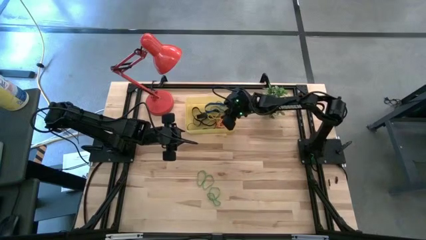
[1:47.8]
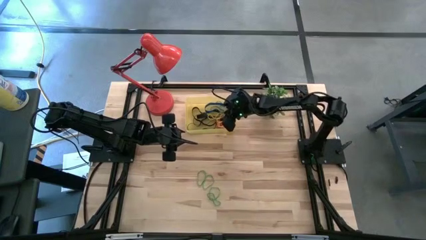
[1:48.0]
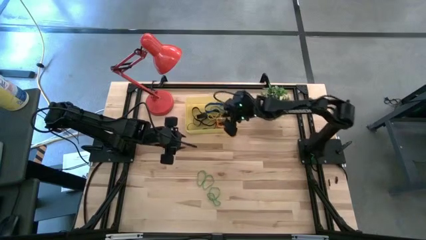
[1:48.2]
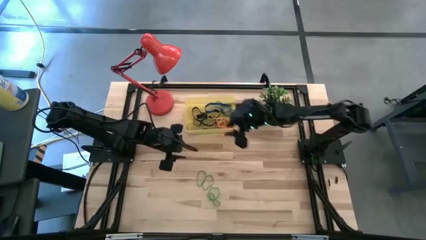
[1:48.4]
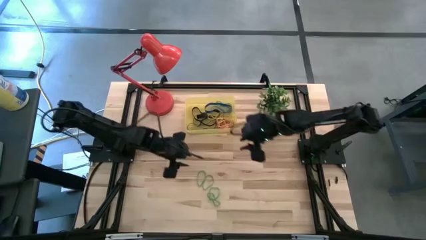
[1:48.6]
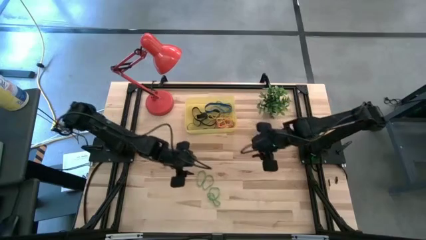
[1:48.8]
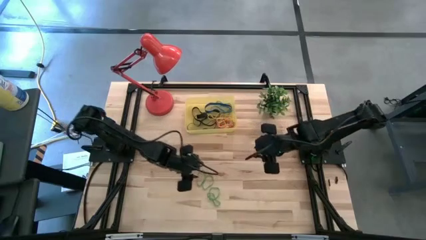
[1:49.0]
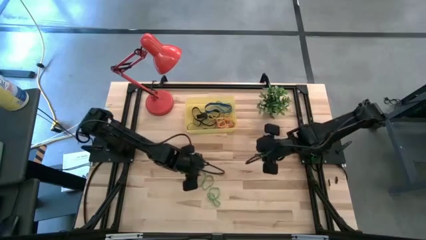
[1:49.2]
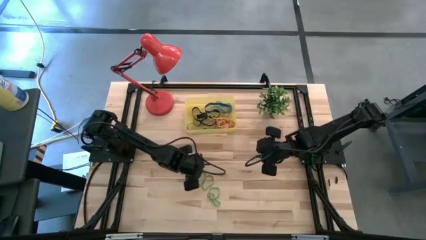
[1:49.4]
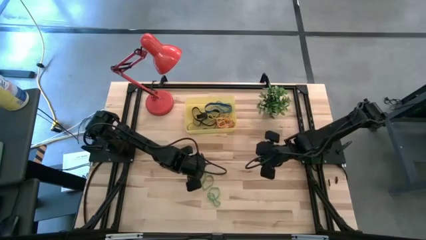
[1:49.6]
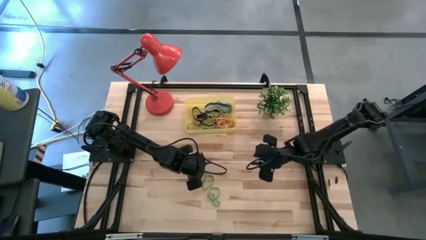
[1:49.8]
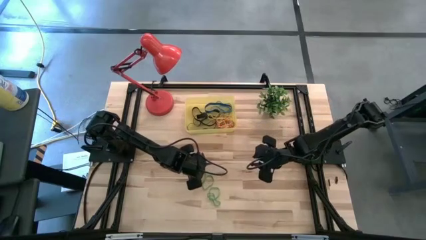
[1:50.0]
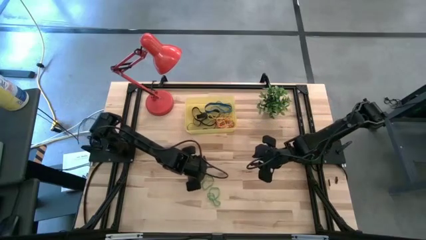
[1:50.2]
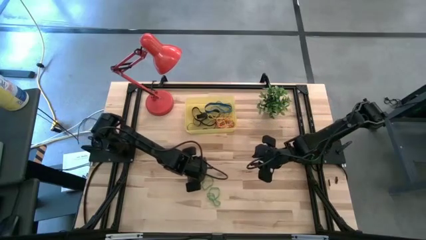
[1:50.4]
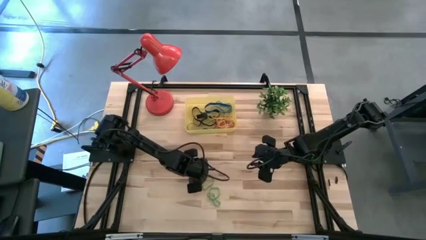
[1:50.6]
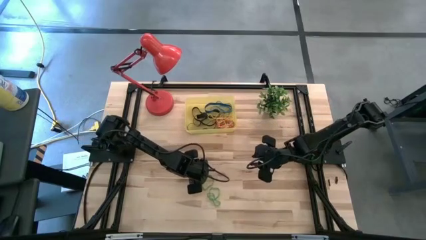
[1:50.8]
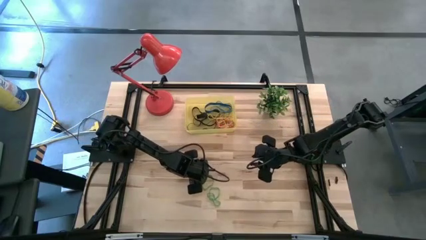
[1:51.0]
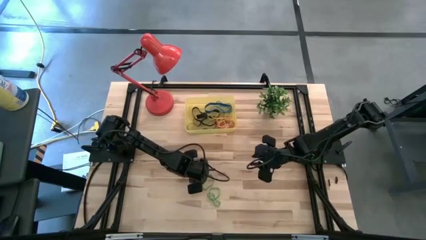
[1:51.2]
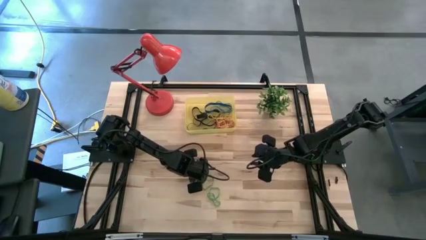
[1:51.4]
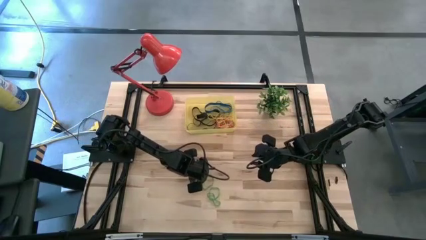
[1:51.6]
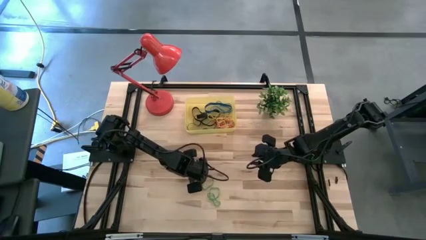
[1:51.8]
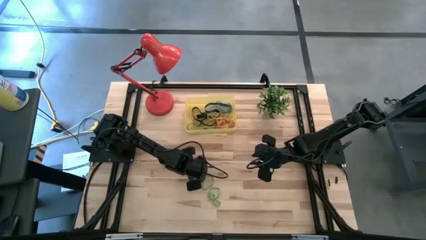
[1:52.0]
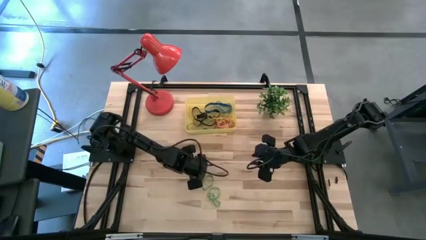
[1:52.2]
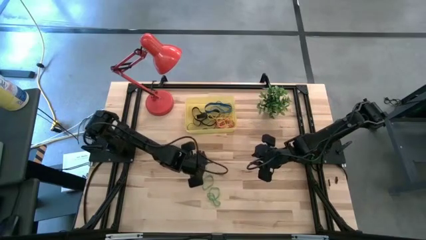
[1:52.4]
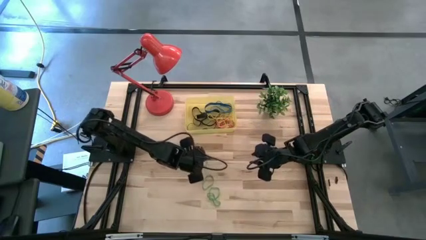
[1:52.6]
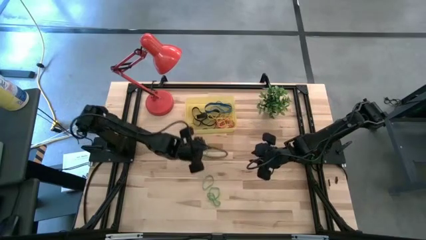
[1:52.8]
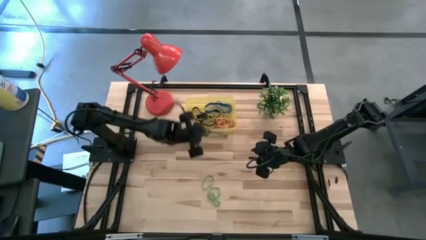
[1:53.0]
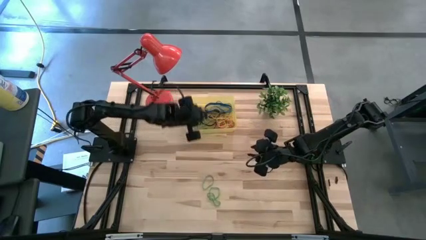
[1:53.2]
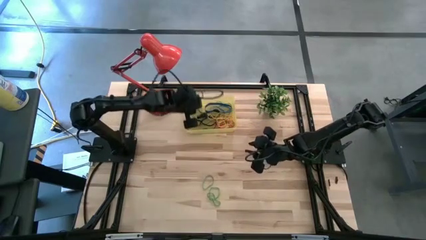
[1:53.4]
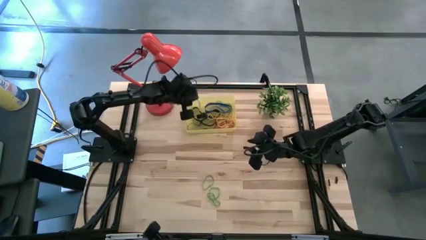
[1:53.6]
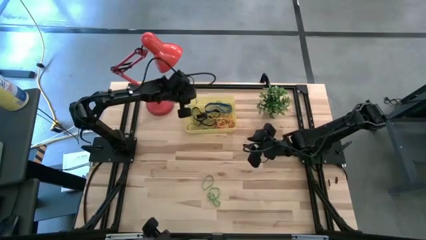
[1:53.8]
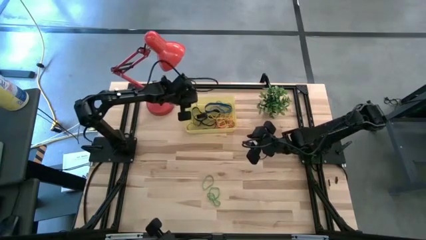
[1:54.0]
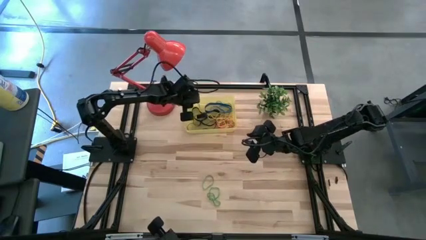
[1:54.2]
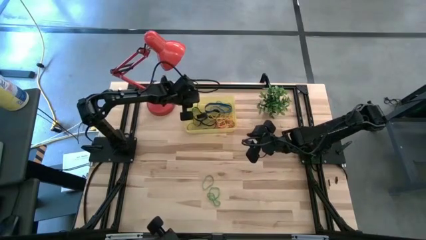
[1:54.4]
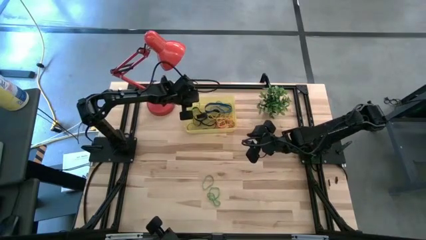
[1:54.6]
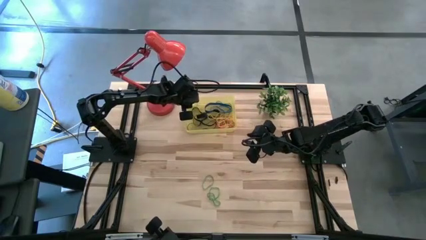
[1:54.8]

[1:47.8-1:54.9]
Task: Pick and place rubber bands into bin
Put the green rubber band into the yellow container

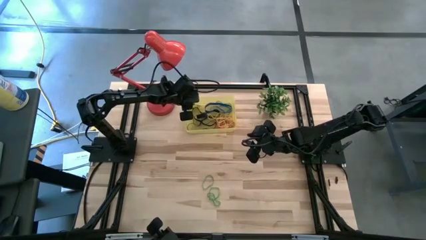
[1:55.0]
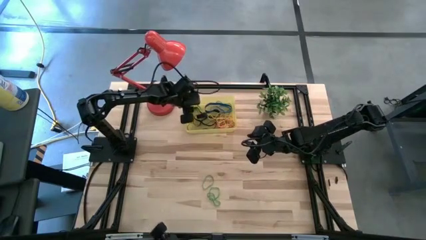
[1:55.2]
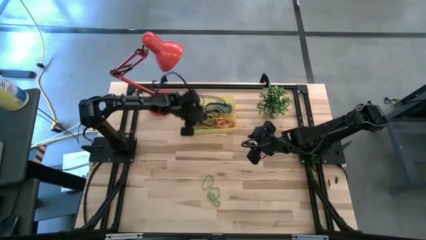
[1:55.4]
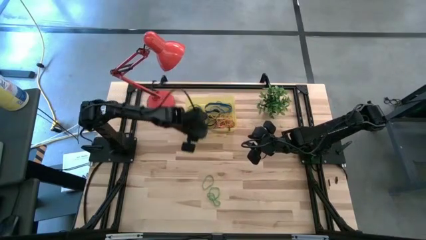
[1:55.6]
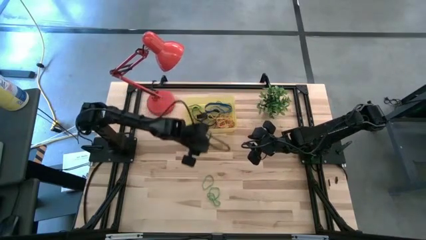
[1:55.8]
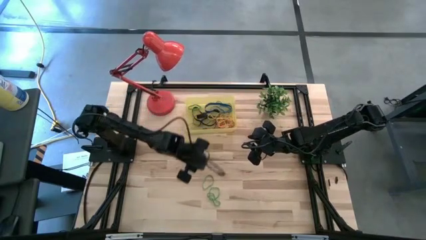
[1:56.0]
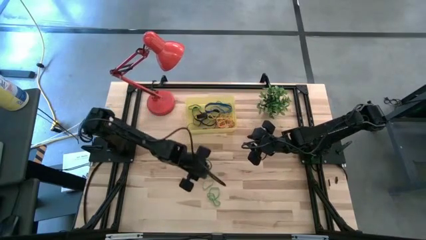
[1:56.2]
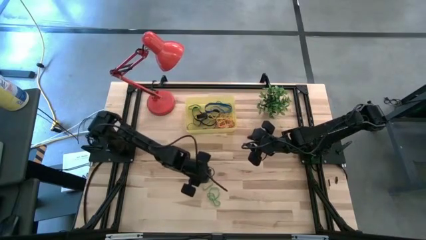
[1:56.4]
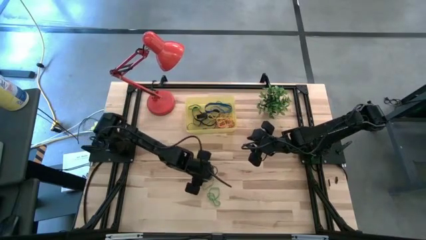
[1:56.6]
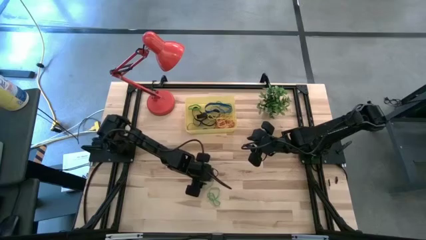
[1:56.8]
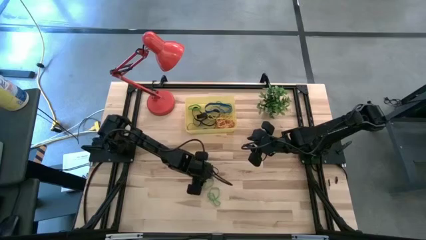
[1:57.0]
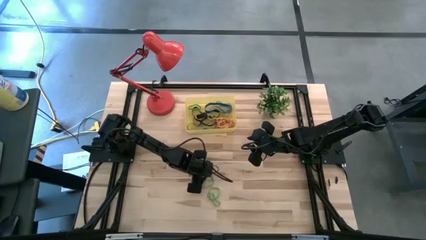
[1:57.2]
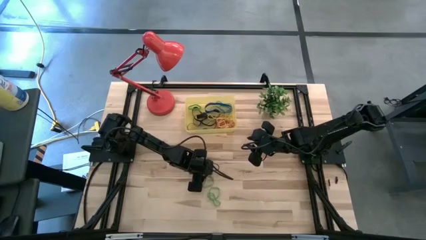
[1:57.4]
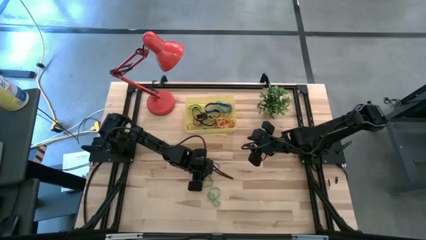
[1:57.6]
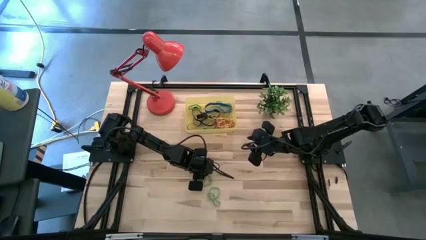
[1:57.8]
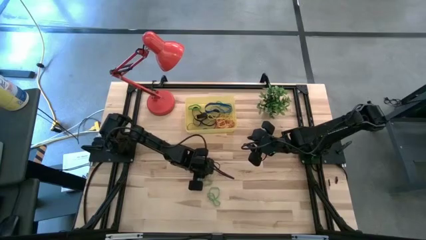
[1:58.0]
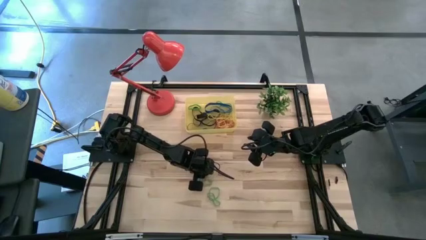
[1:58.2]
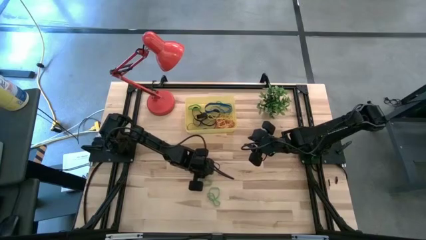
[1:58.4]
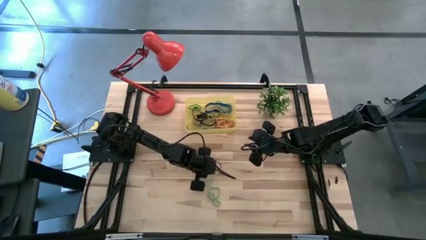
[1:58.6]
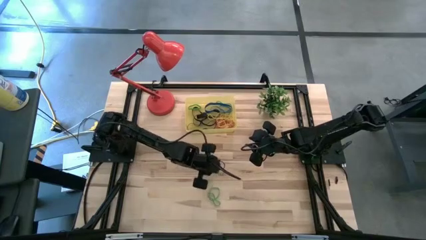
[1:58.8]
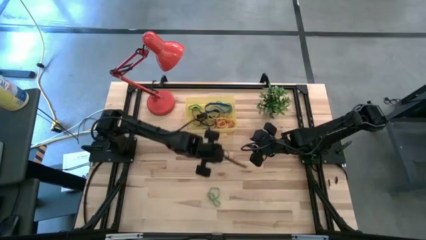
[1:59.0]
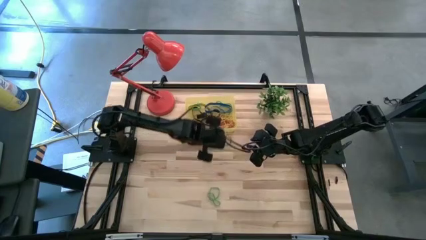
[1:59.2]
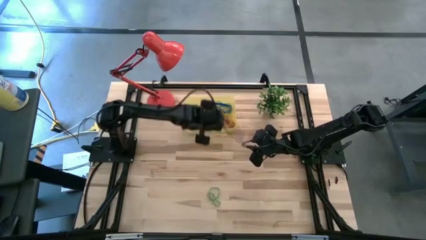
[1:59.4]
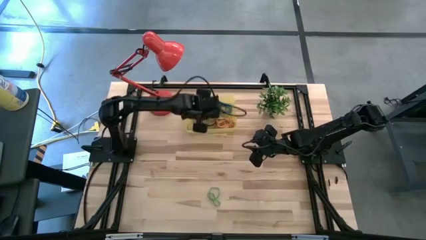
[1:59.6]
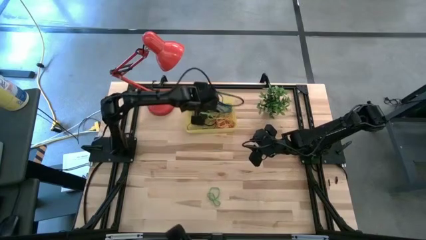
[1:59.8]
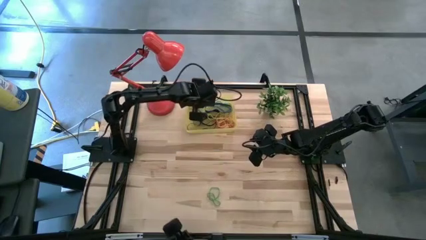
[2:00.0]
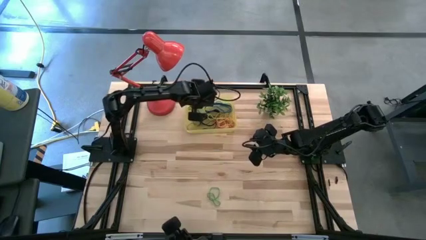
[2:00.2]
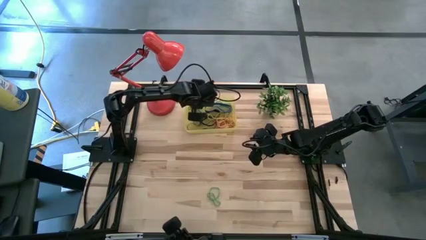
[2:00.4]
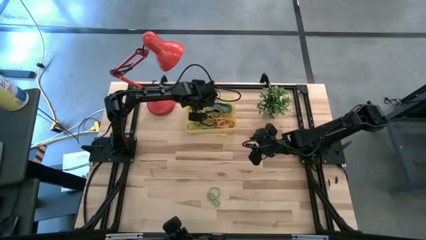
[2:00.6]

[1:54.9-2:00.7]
Put the green rubber band into the yellow container

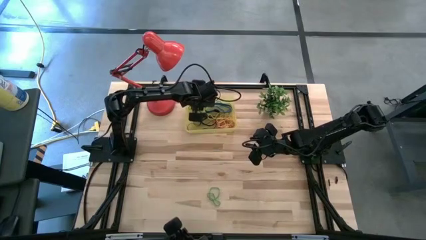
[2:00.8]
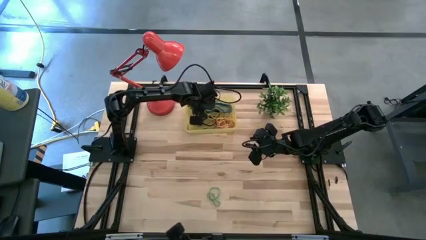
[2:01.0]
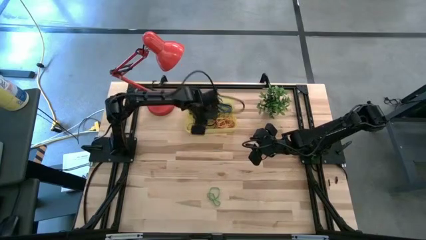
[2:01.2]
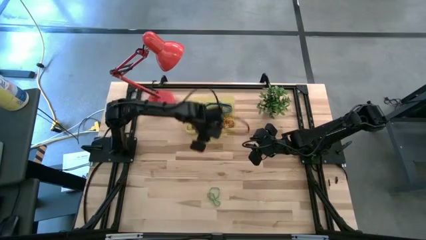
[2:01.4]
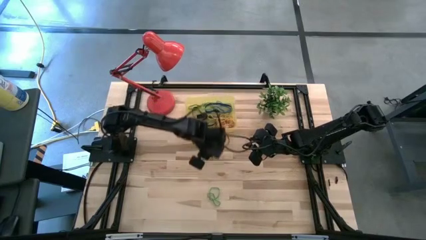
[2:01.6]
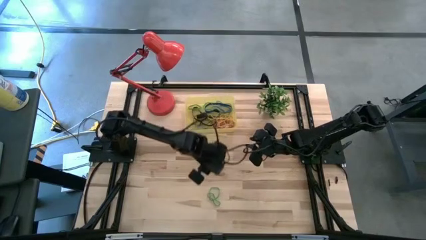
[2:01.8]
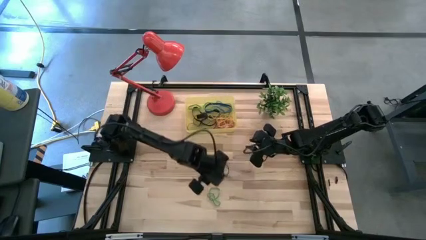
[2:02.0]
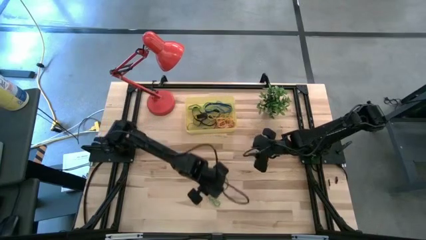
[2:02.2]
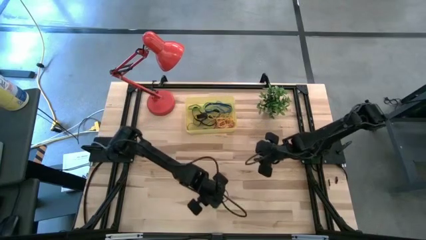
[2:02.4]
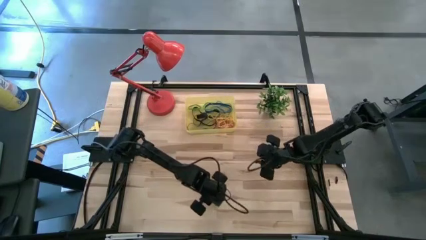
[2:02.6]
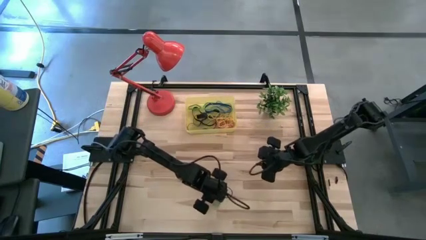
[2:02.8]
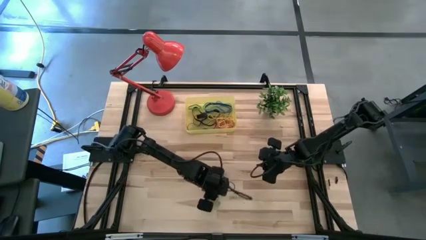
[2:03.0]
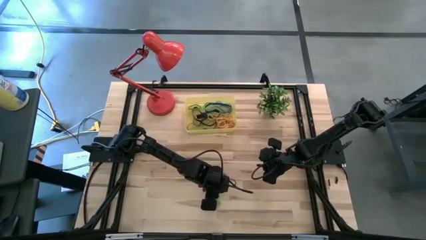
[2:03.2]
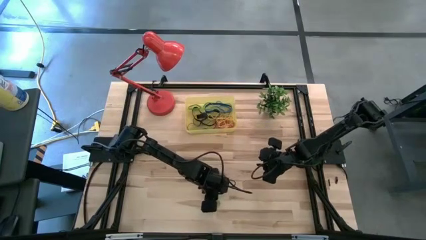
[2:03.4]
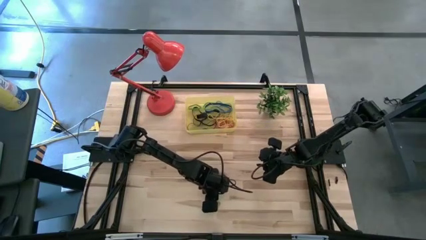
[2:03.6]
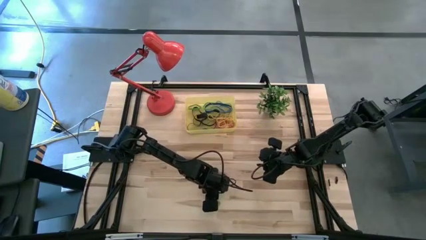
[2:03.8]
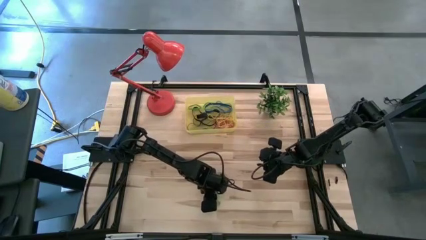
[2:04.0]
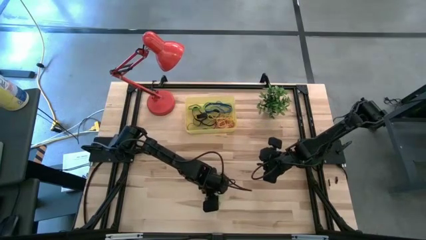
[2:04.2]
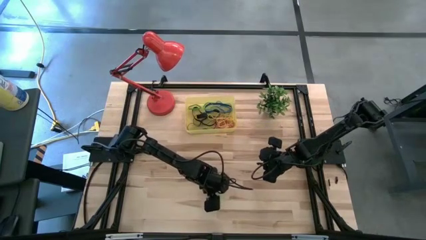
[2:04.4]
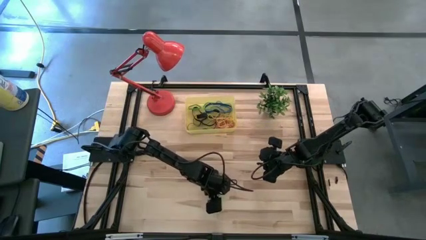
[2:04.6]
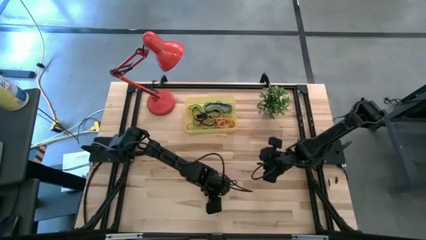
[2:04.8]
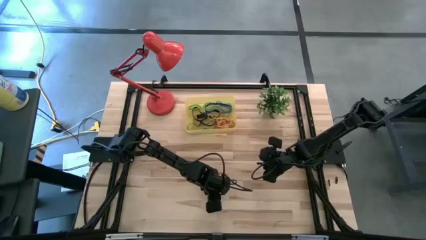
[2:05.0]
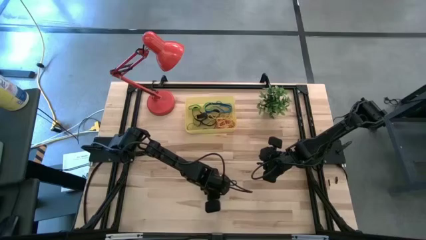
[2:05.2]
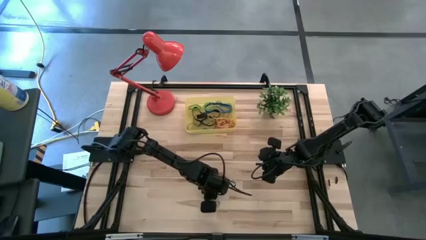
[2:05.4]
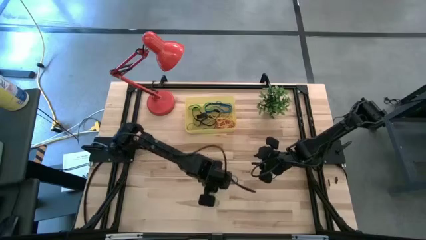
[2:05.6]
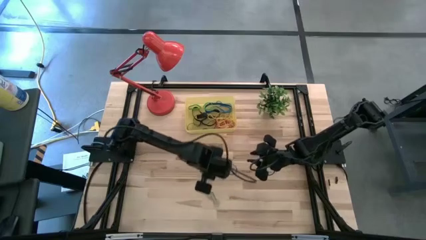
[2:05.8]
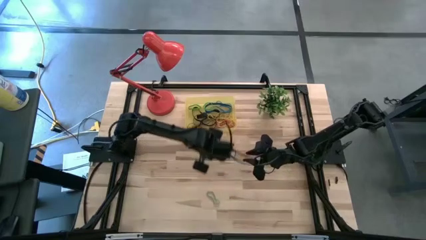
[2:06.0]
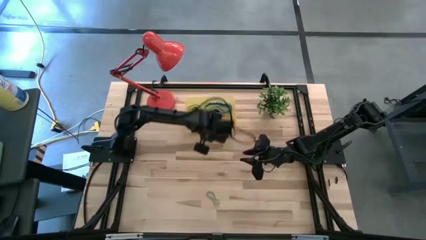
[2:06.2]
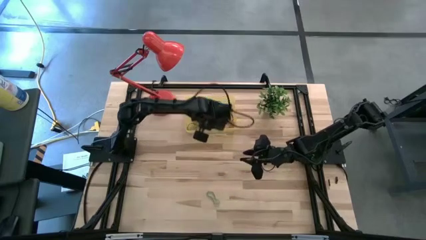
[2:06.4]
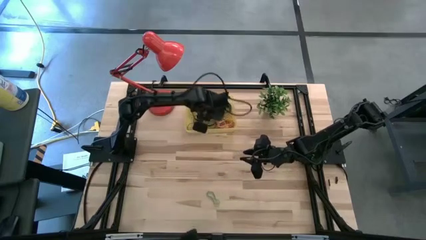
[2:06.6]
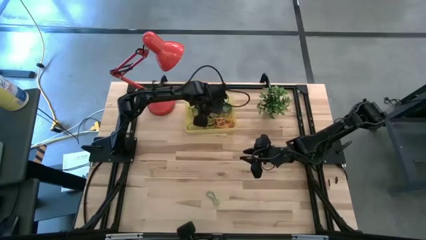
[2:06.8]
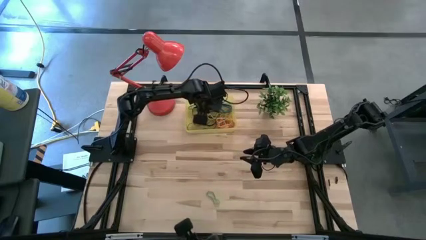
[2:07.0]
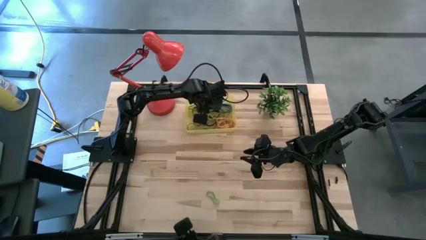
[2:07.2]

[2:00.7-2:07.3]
Put the green rubber band into the yellow container
